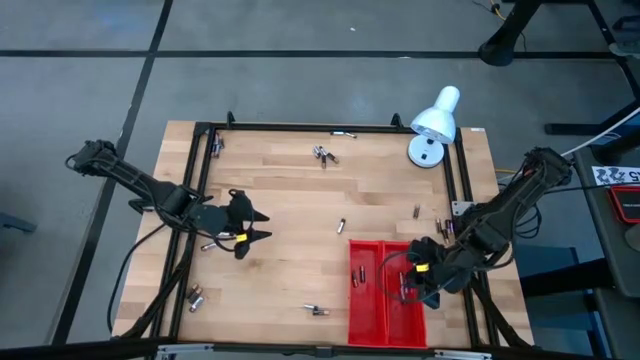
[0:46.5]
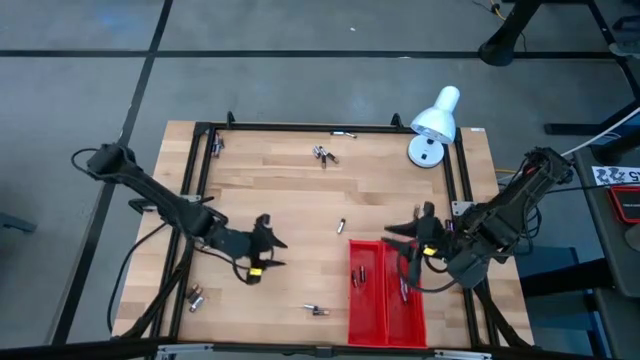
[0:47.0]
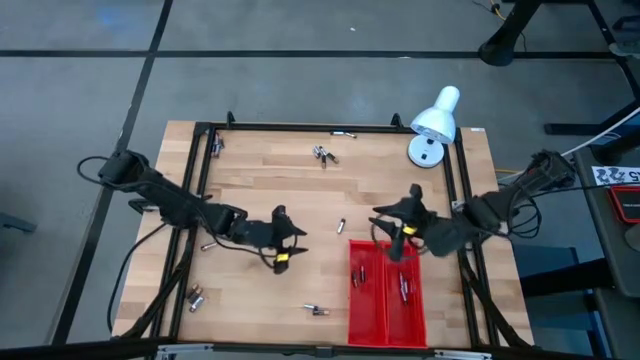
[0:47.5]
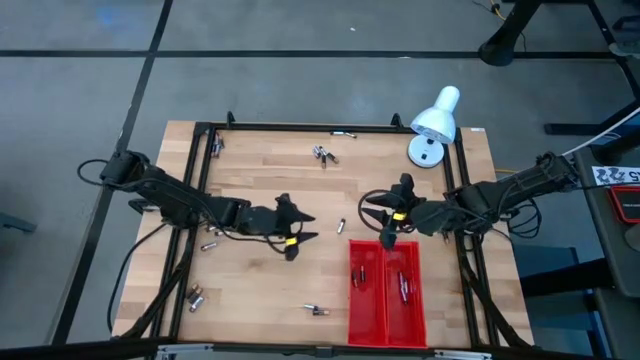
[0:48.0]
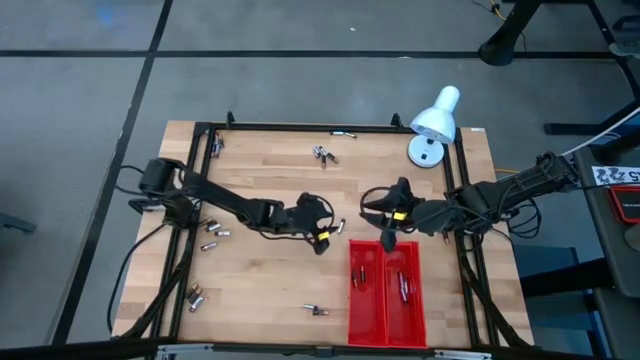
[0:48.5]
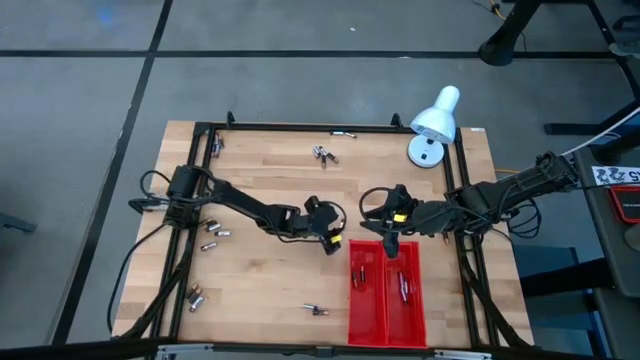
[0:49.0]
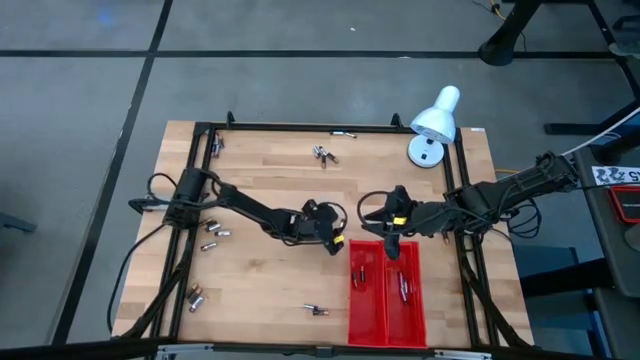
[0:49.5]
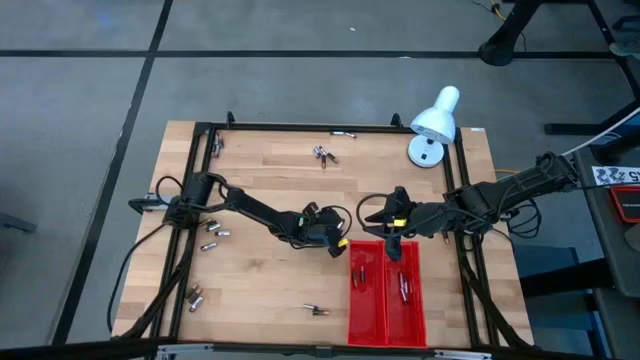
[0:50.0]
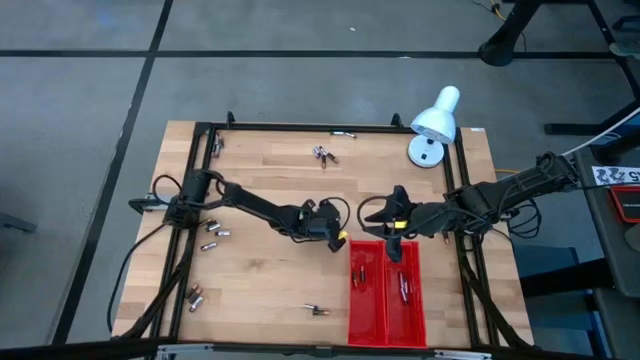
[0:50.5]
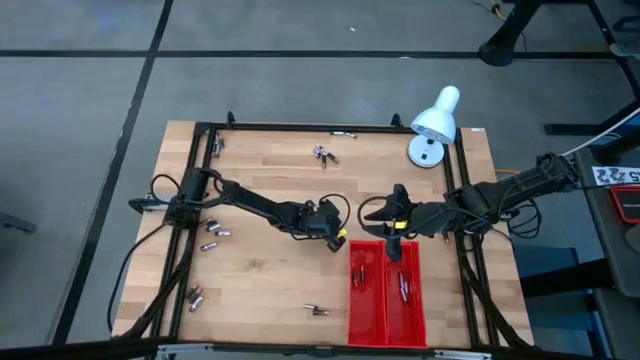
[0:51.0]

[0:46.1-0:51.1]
Task: Sort batteries
Put the silver battery into the right red bin

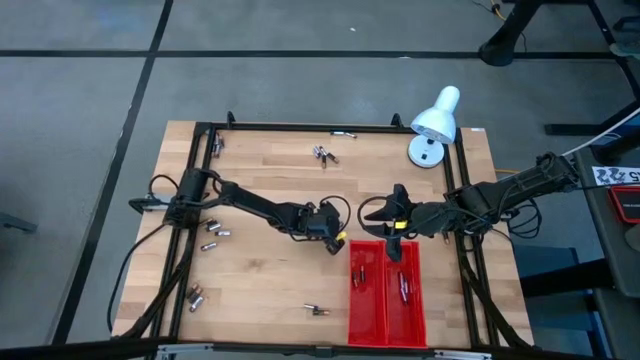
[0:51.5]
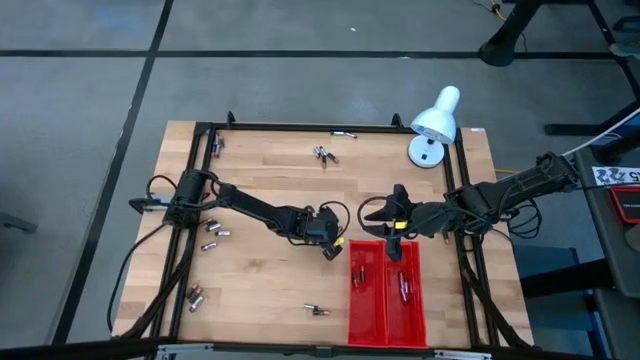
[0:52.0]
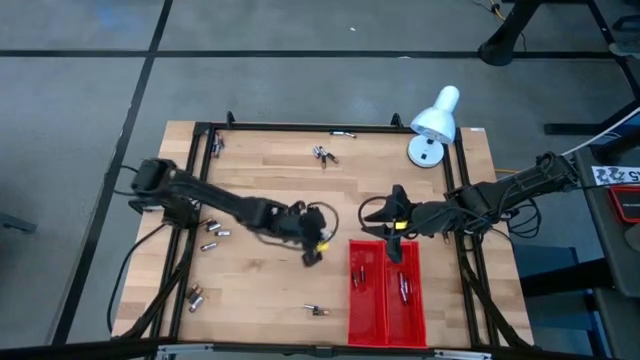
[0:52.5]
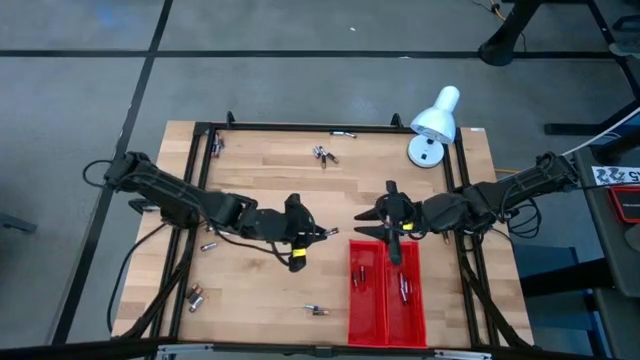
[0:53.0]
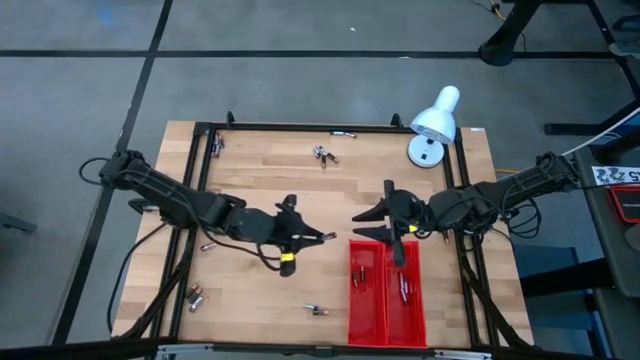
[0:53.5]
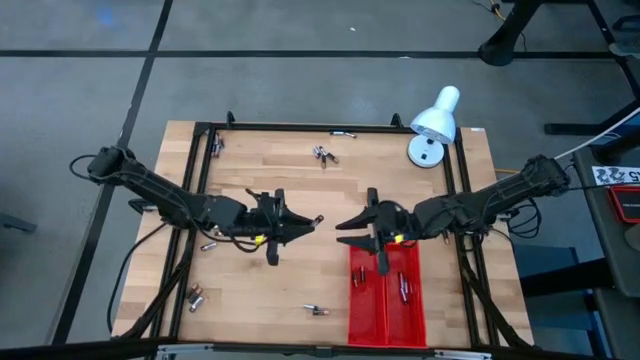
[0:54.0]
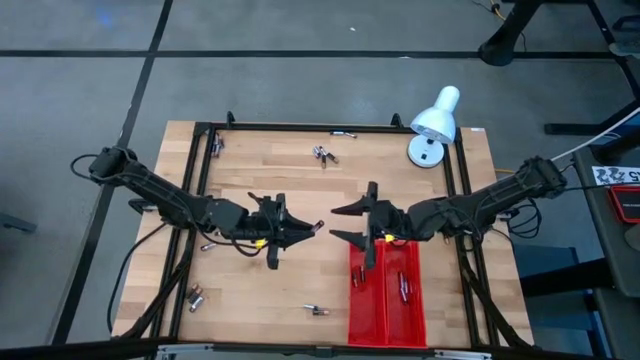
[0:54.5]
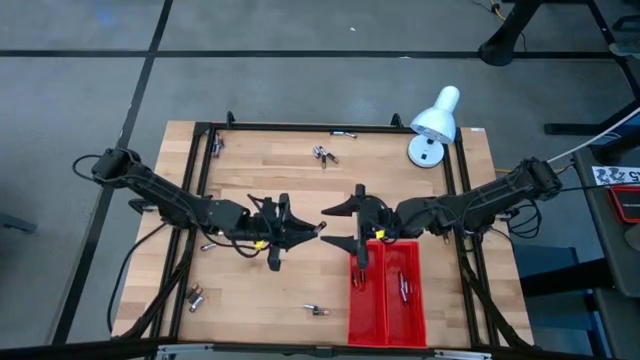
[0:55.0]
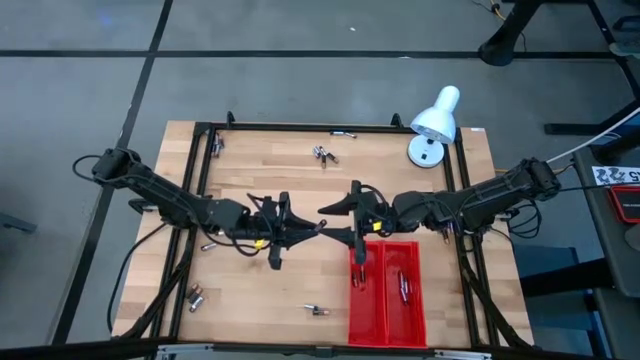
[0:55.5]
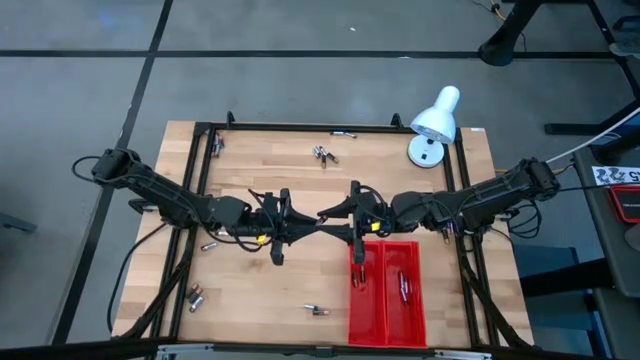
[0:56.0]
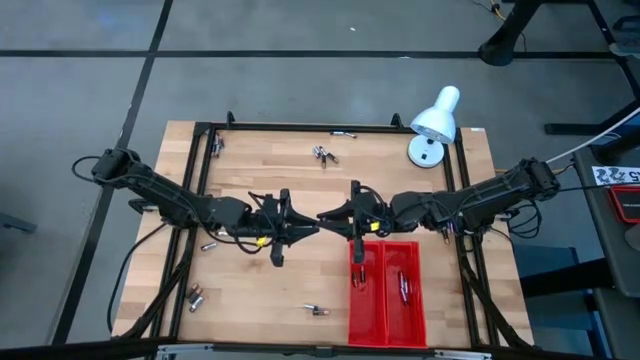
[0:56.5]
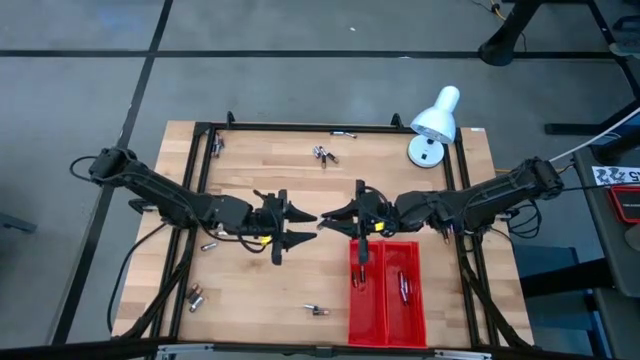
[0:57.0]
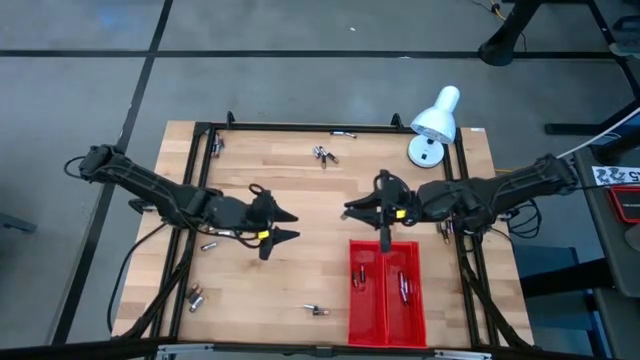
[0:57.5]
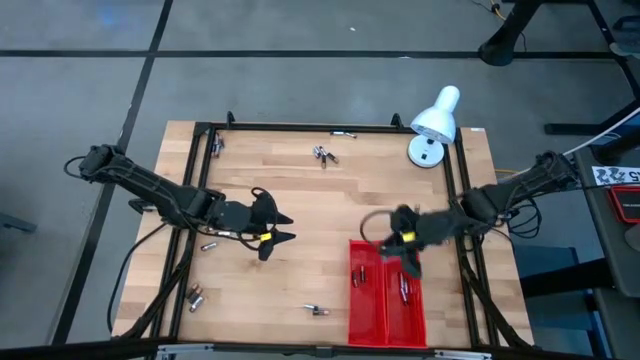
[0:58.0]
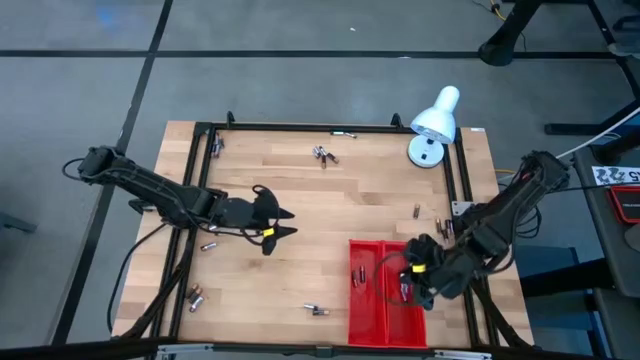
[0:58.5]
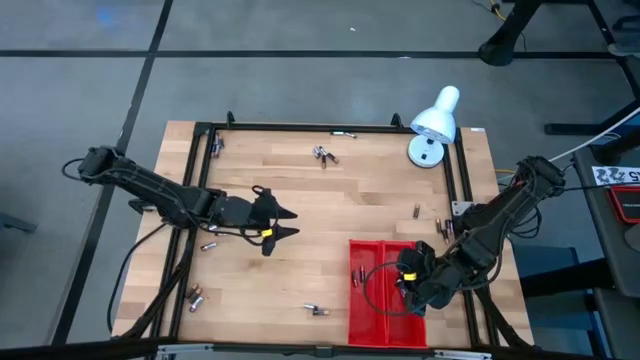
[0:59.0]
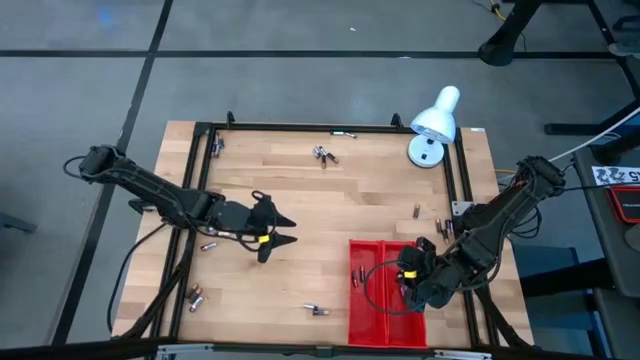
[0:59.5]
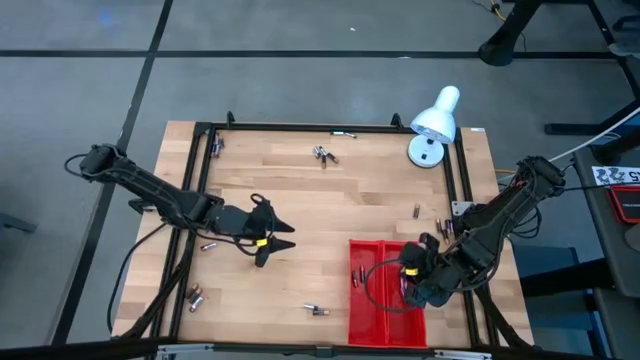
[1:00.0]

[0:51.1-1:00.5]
Put the silver battery into the right red bin

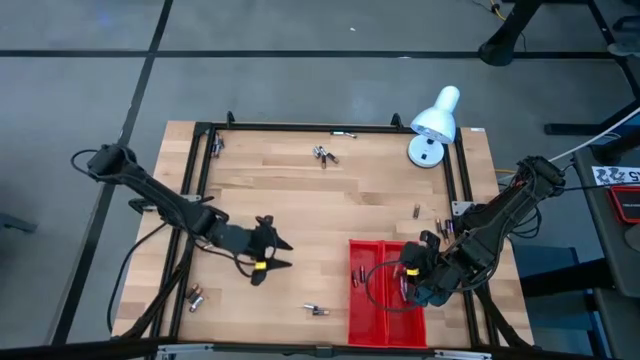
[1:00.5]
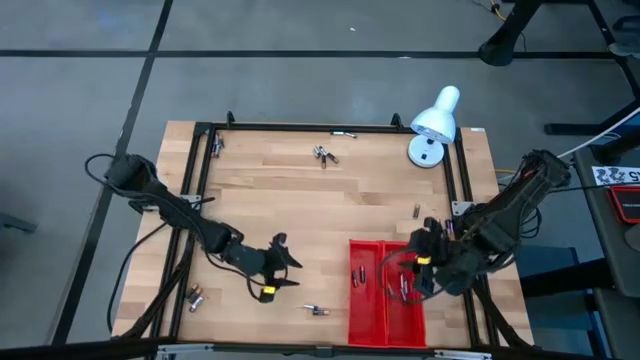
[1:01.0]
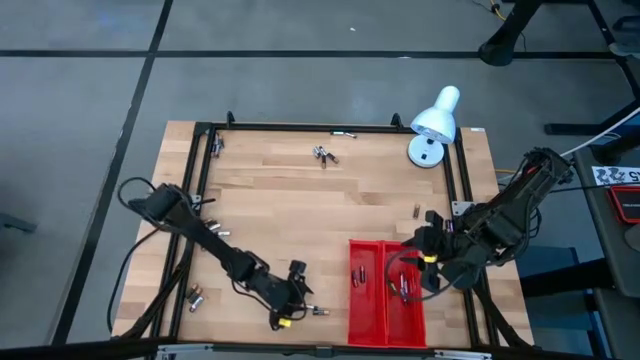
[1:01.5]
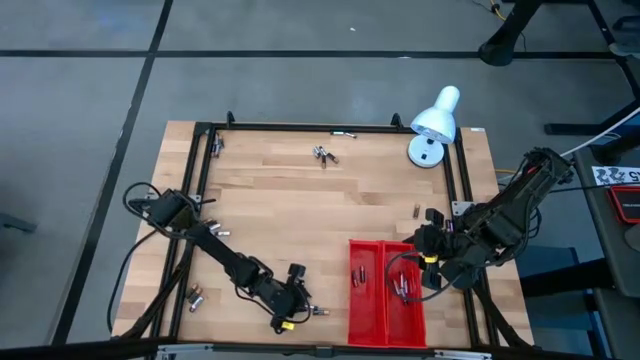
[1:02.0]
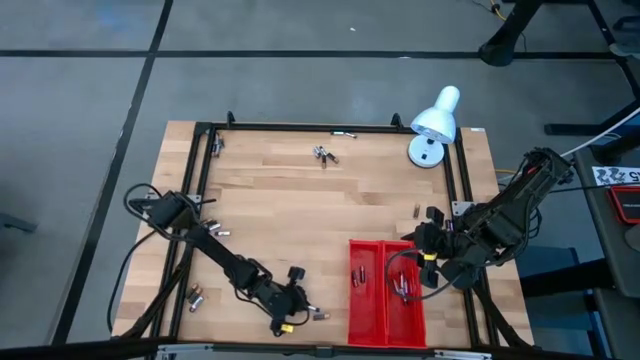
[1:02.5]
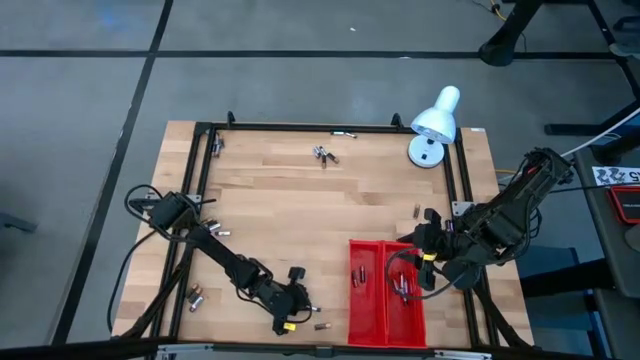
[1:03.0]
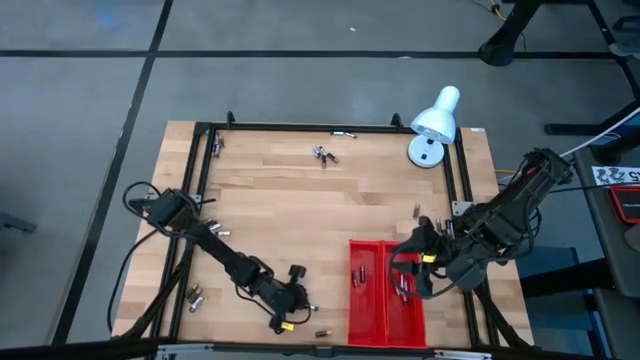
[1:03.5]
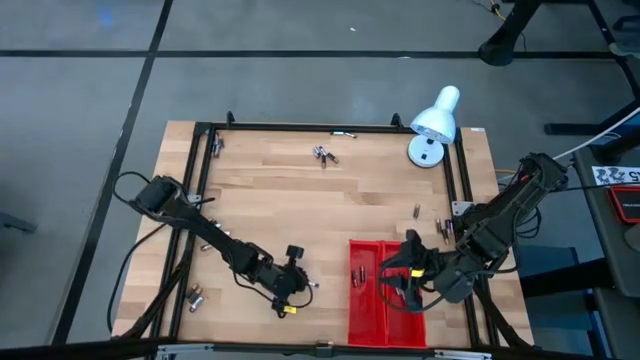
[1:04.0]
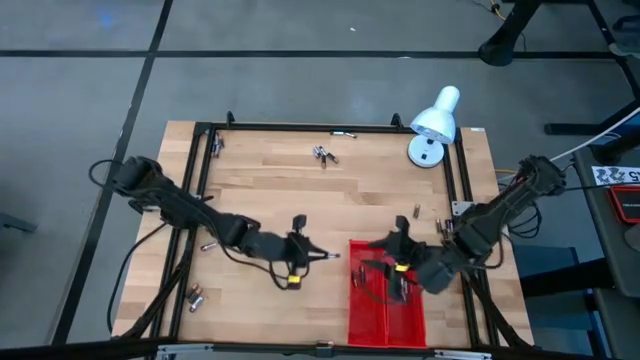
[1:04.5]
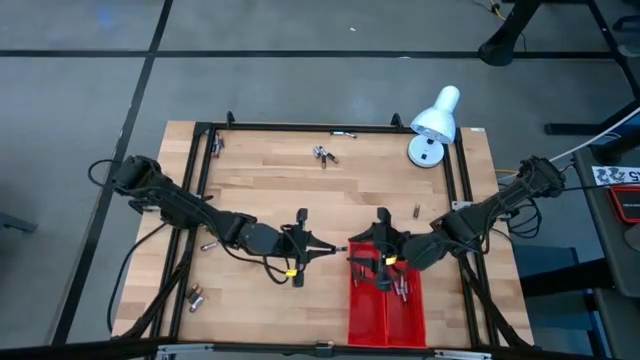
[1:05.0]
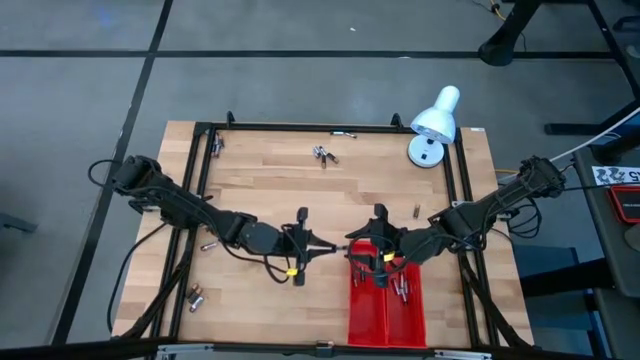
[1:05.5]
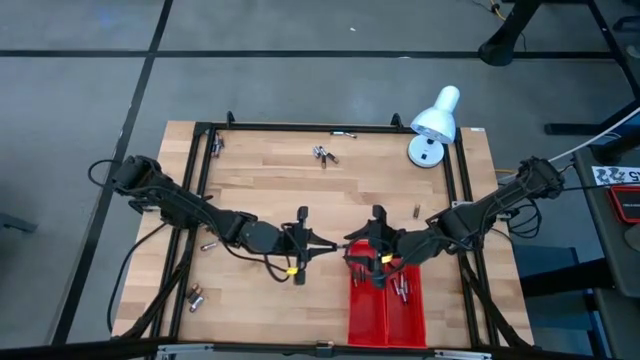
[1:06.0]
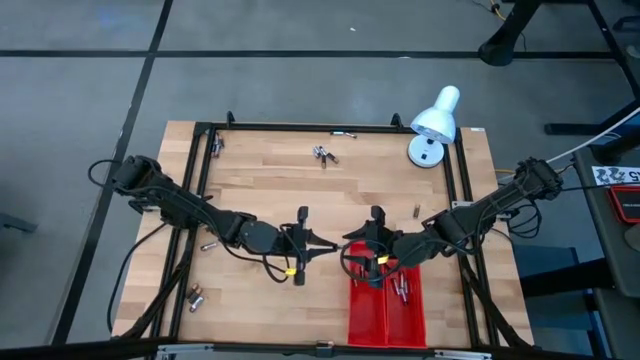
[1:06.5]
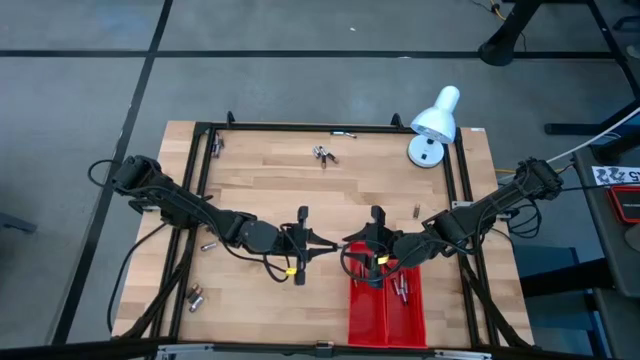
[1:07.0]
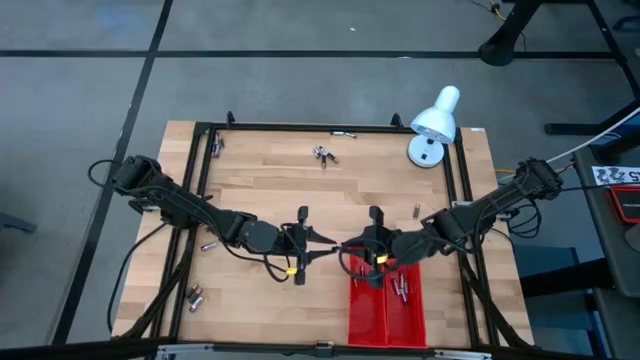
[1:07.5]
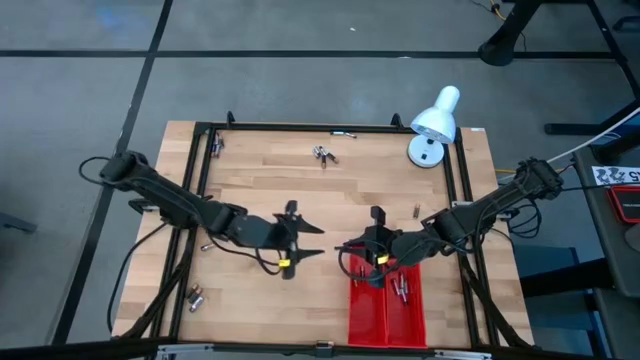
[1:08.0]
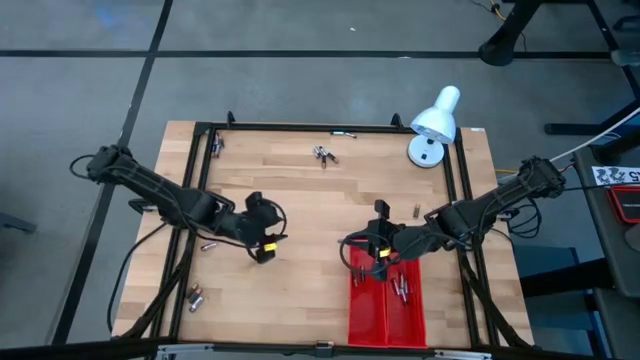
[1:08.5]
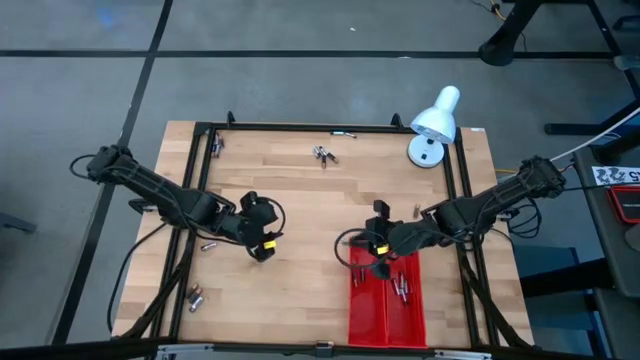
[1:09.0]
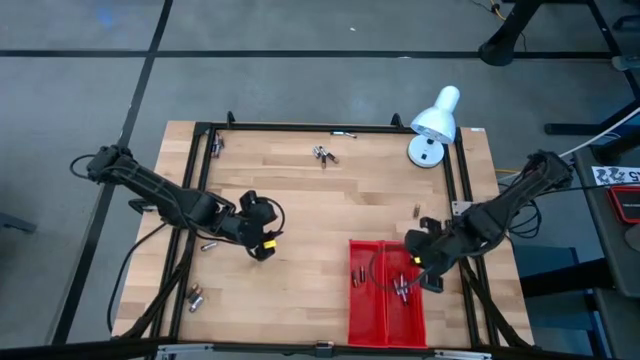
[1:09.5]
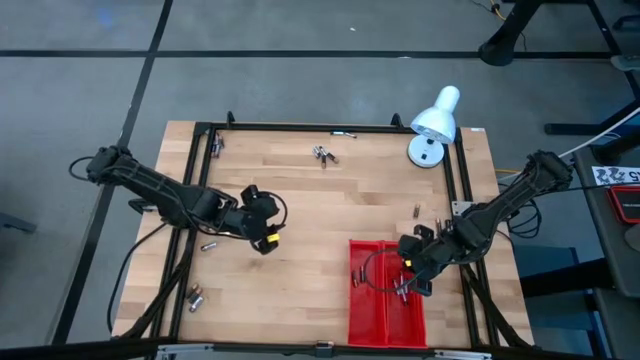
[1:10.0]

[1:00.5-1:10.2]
Put the silver battery into the right red bin
